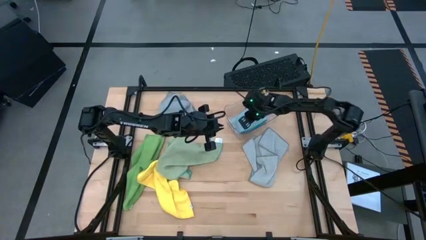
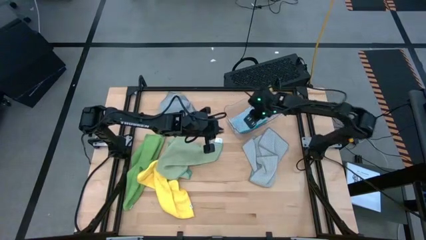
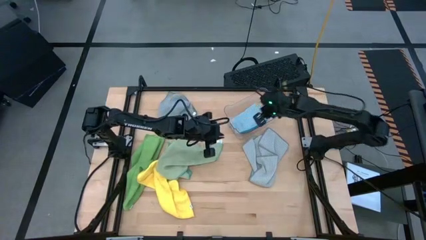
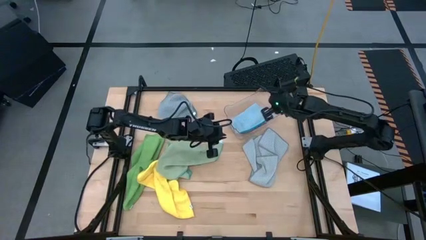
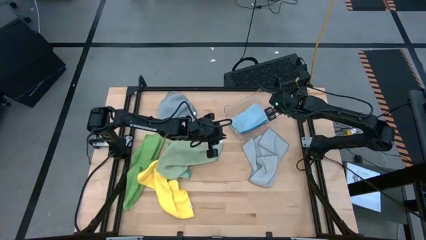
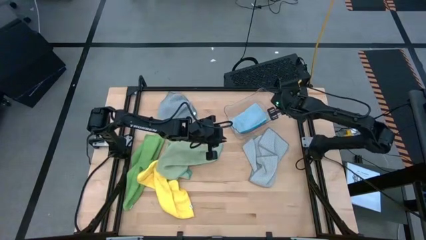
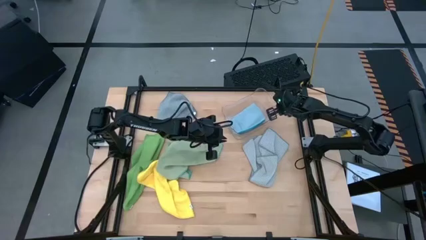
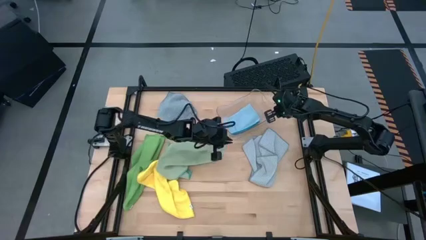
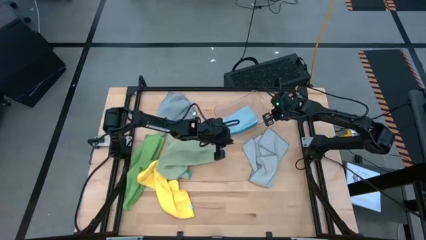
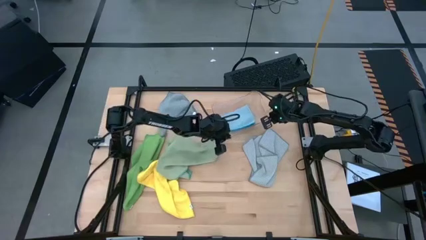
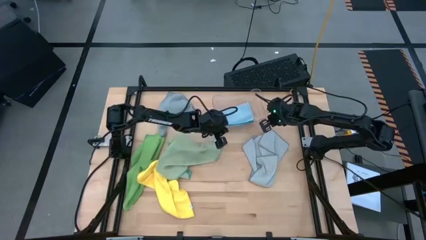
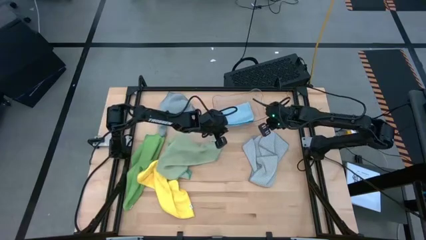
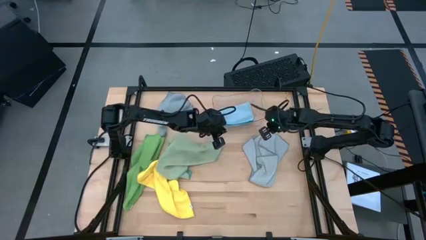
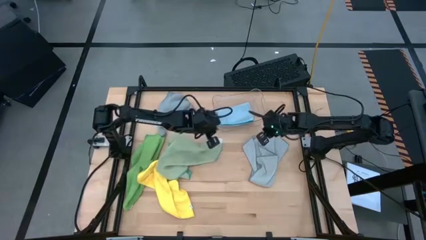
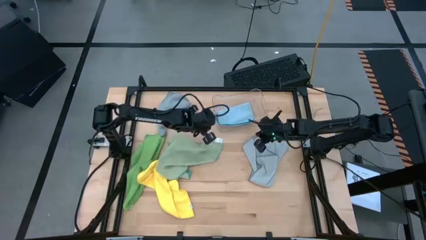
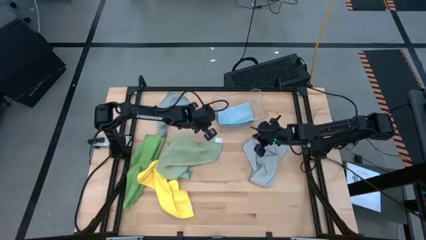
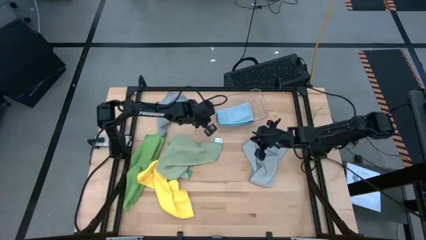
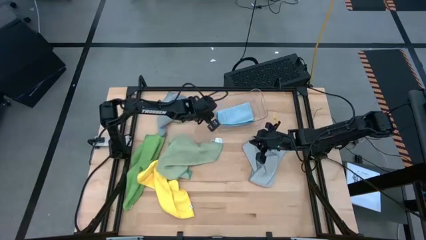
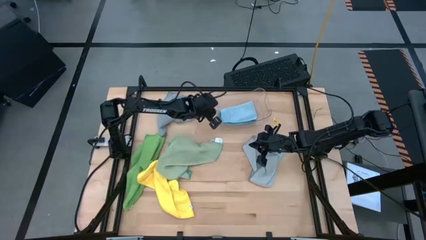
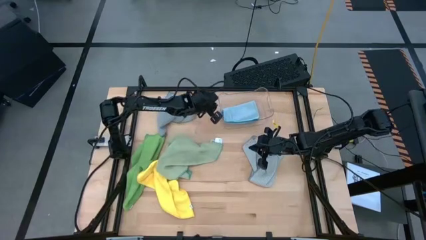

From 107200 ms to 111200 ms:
Task: Fold microfiber towels
Adjust the transparent bin

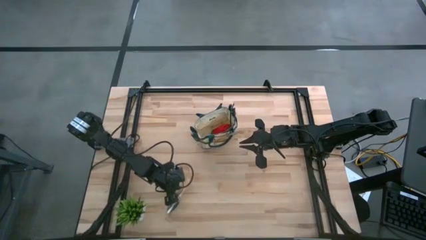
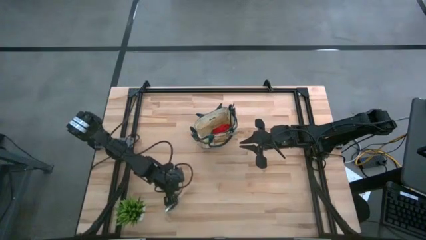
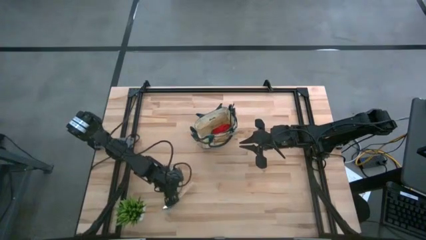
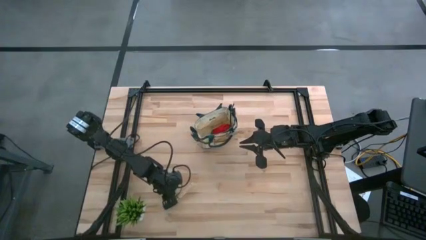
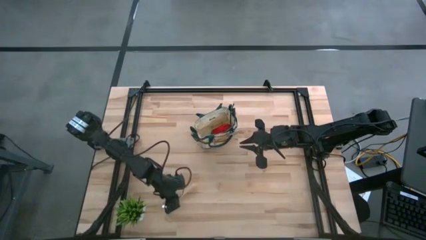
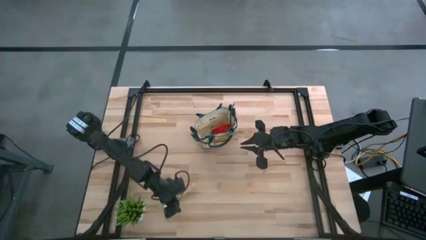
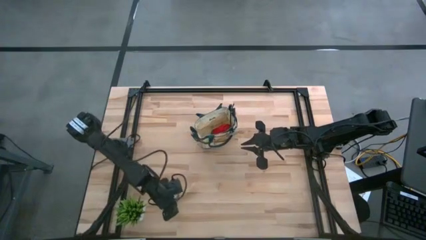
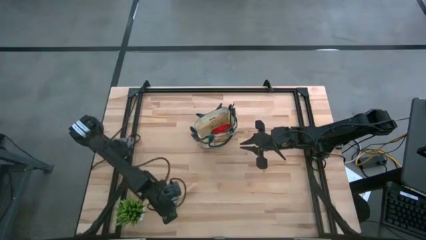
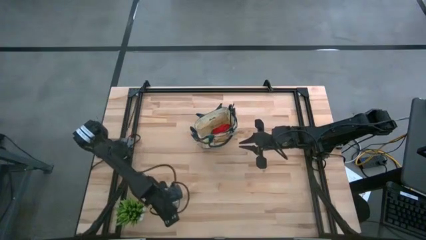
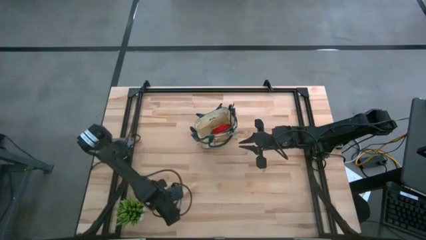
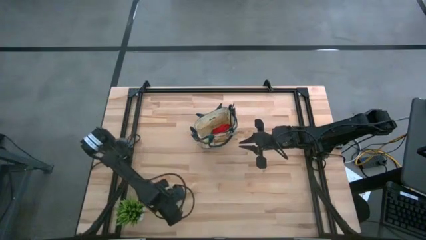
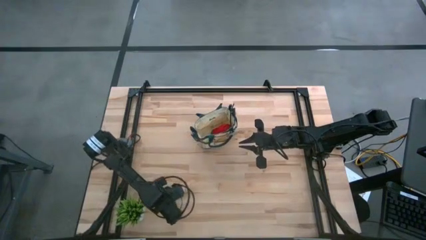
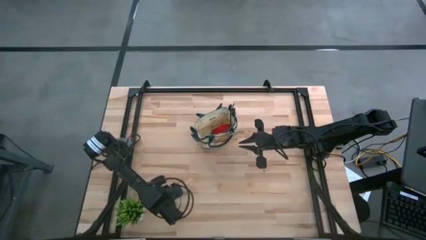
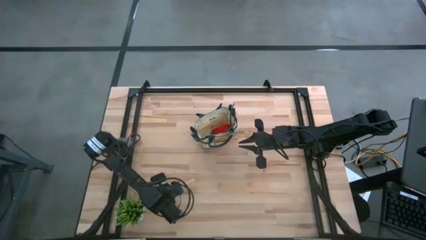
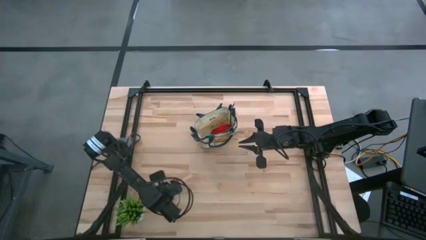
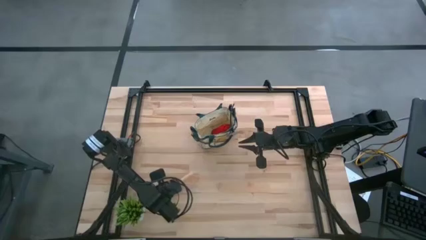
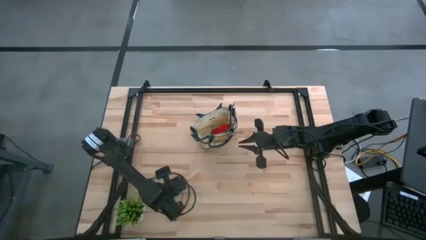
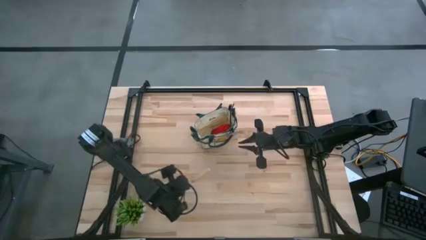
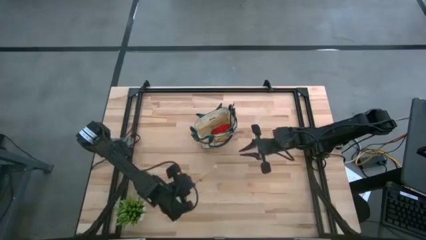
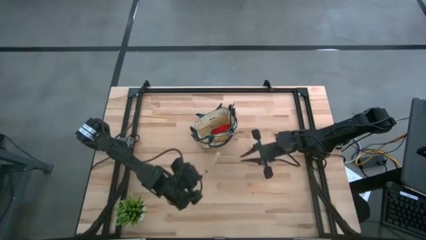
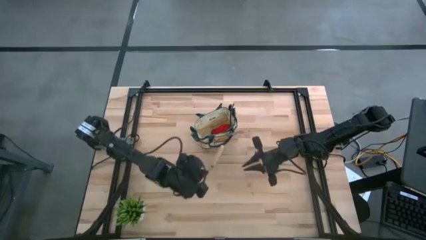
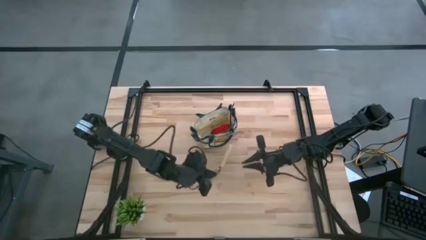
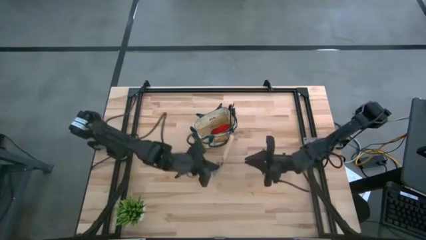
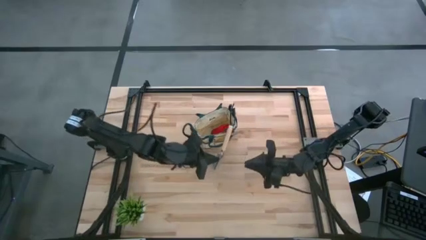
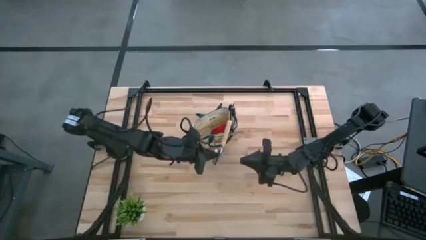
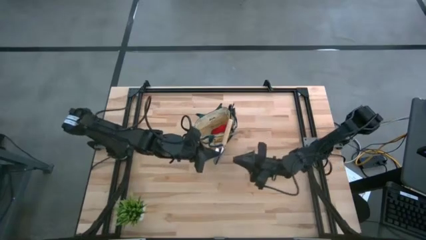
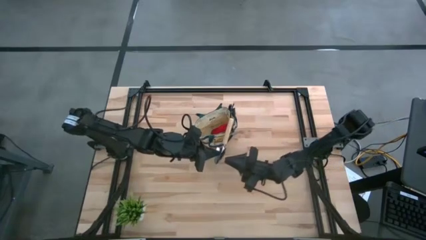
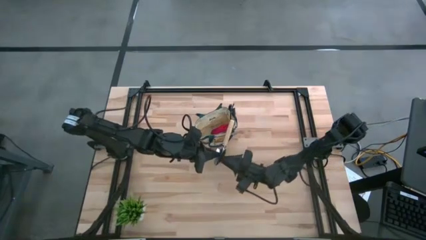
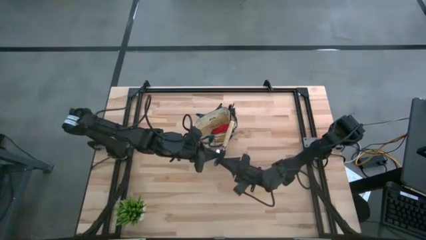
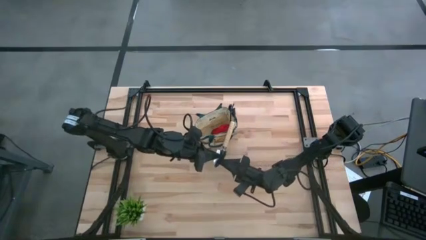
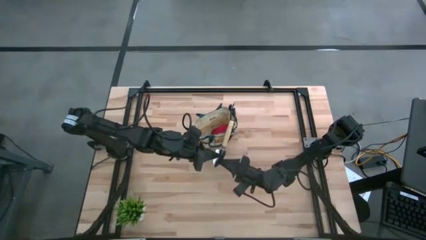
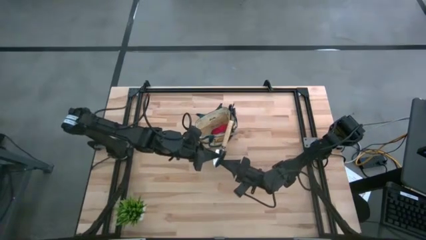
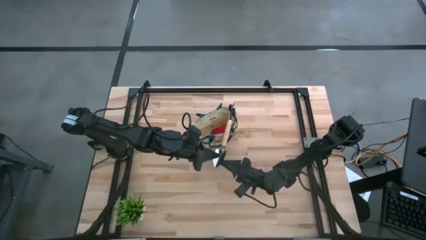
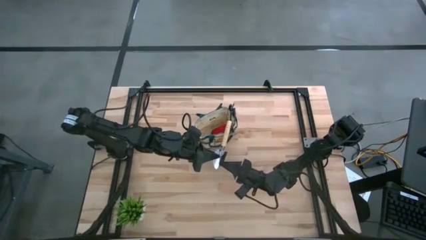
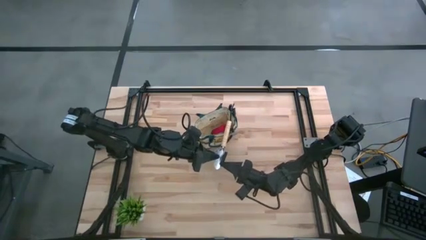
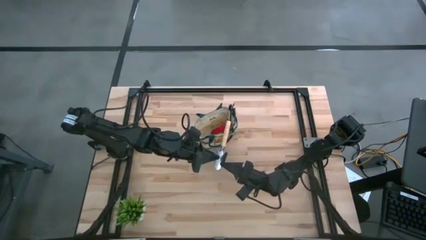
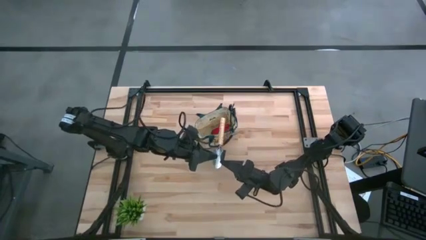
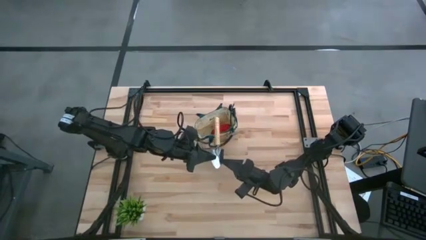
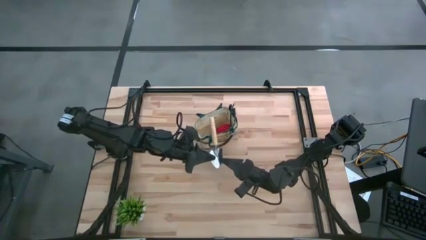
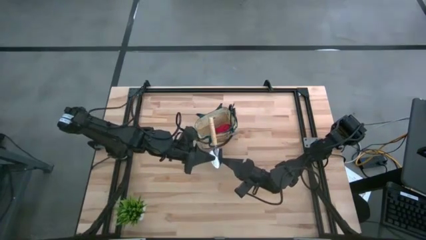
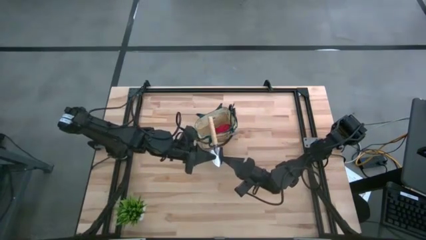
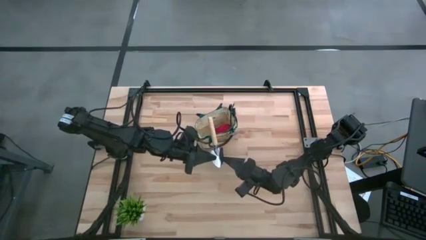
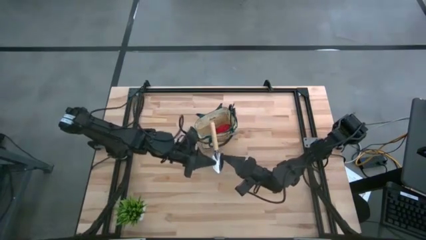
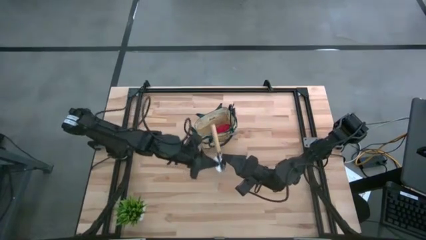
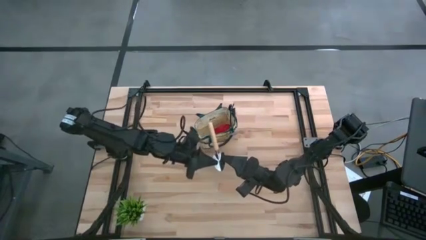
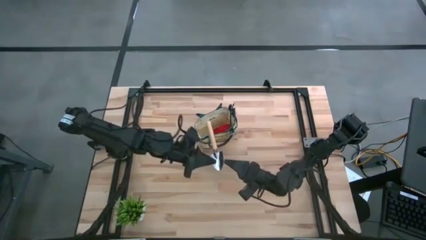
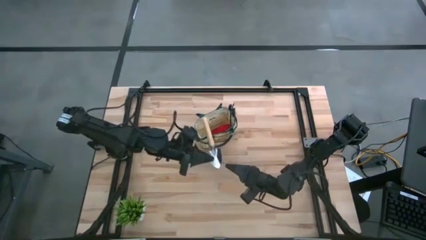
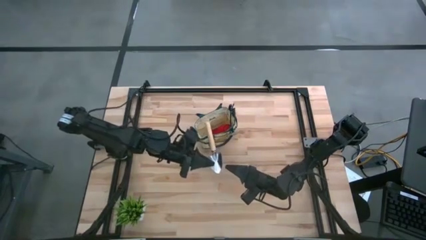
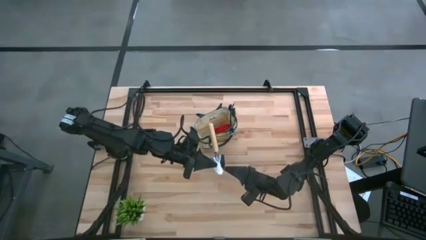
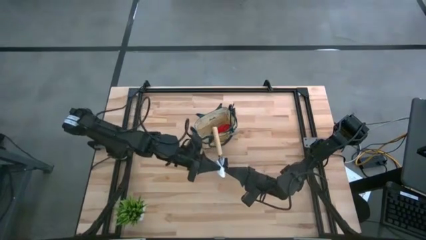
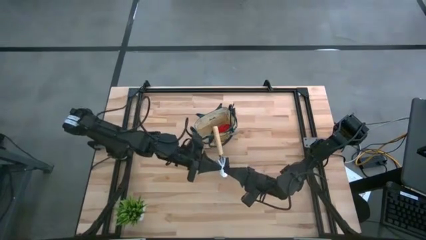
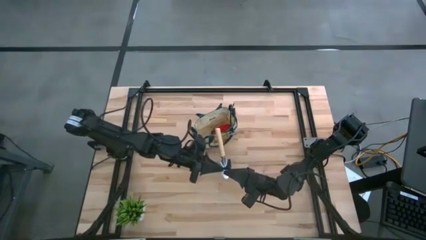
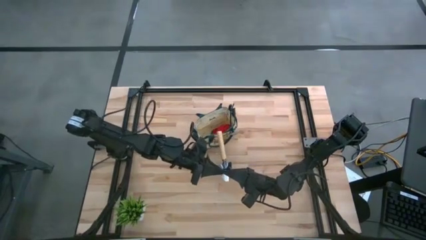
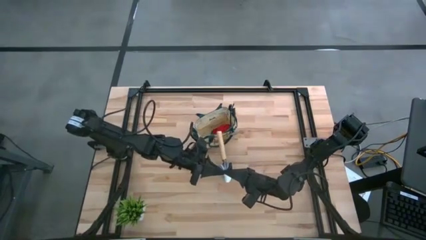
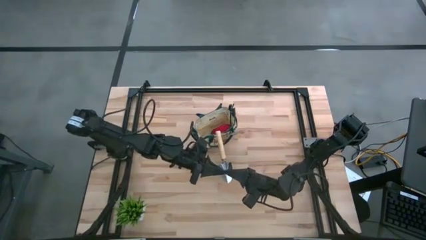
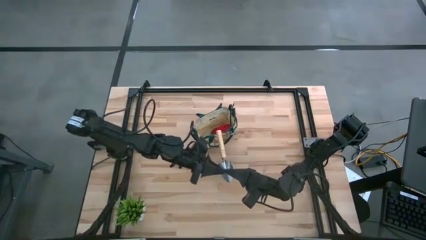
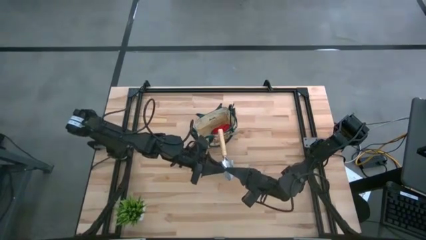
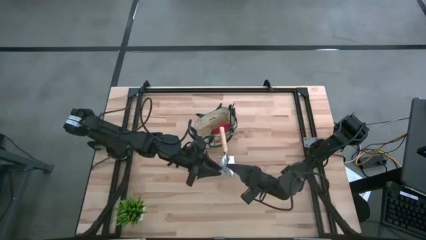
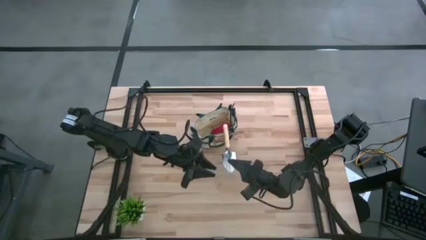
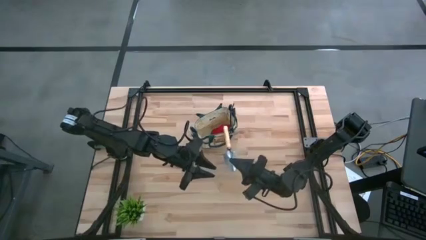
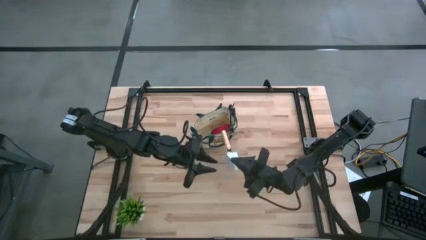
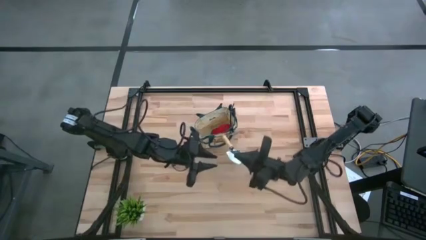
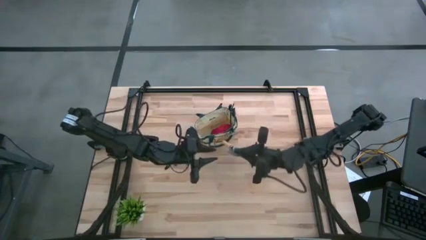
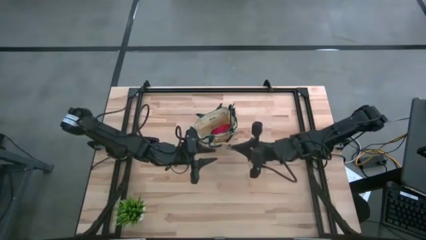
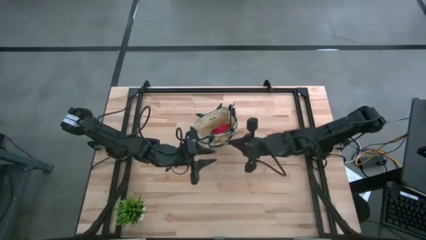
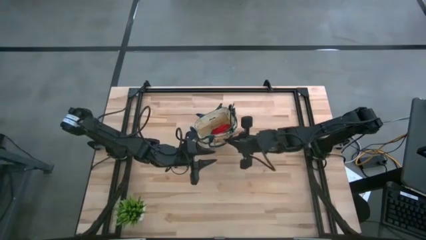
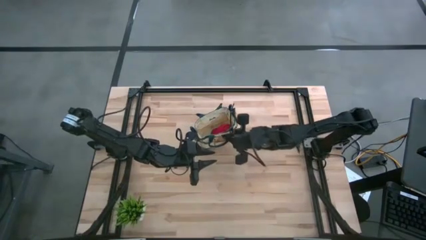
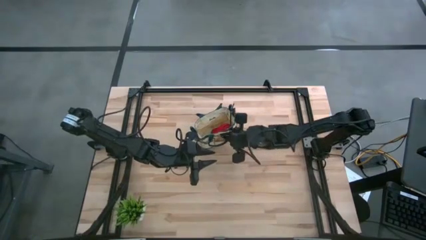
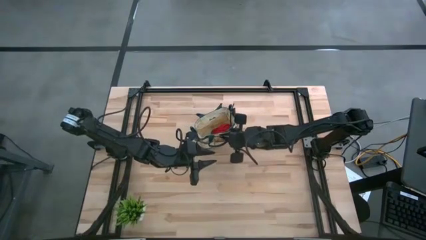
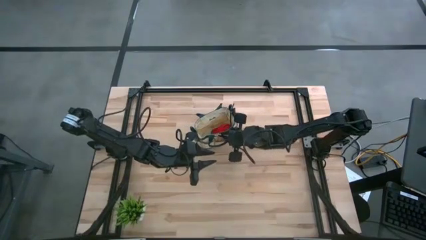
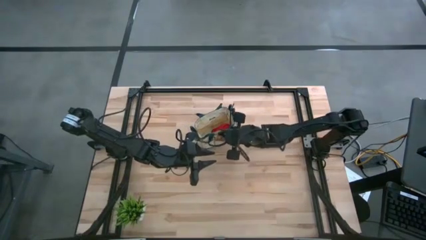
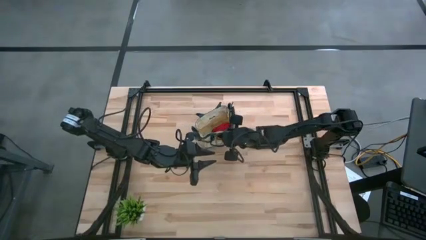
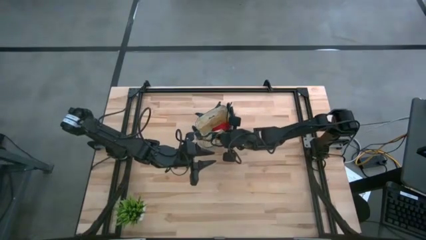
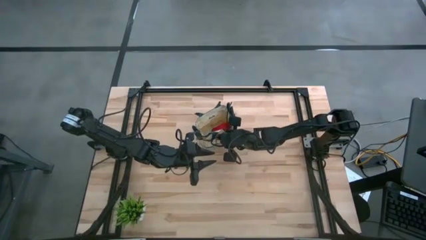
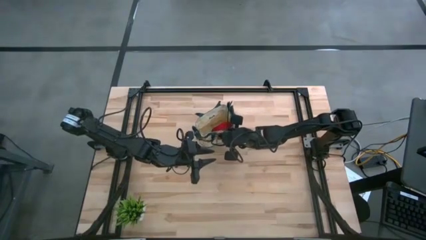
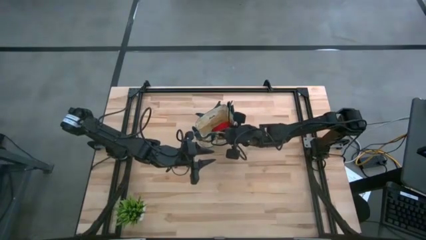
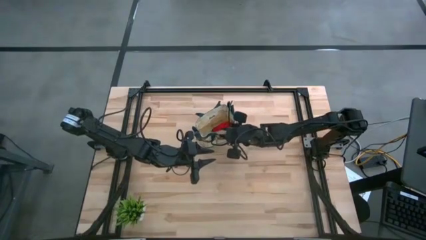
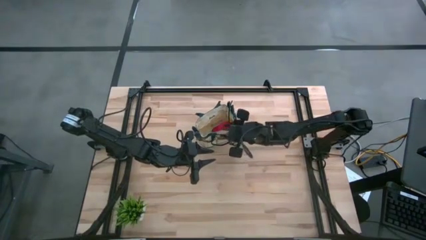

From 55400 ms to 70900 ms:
Task: Pick & Place Garden tools in Gardening bag
Put the brown trowel into the brown gardening bag
